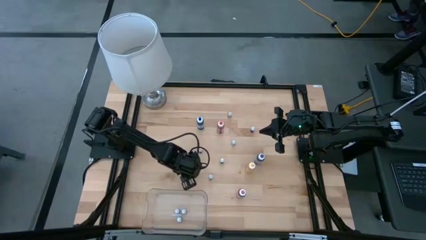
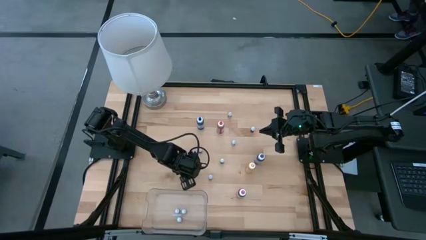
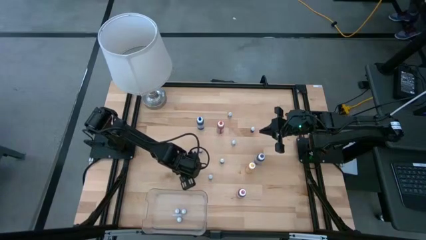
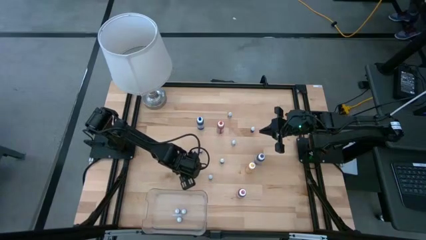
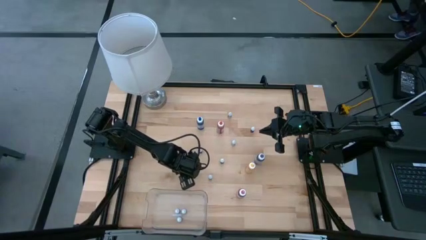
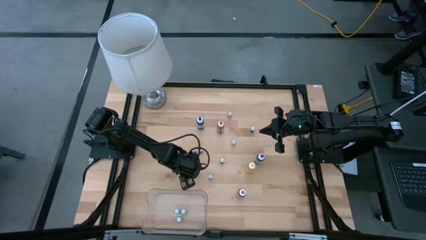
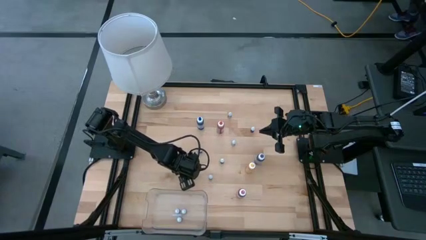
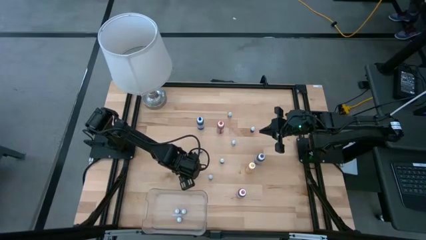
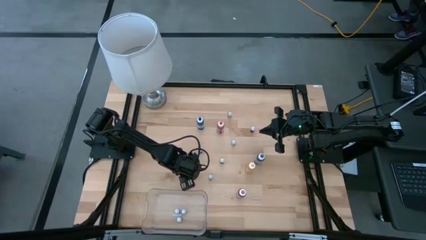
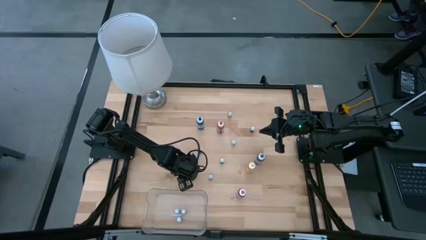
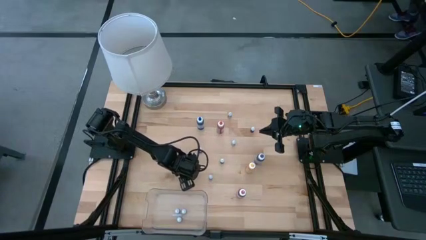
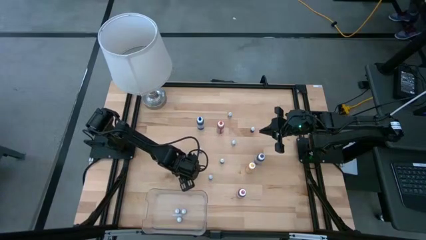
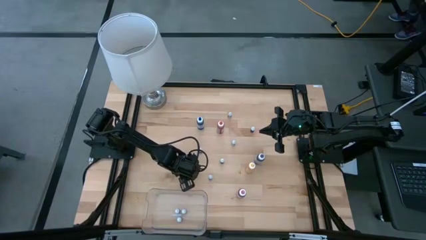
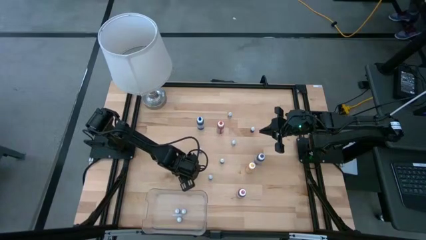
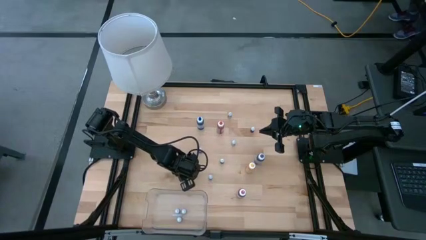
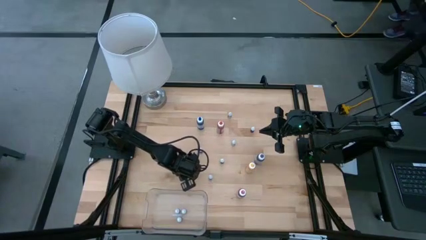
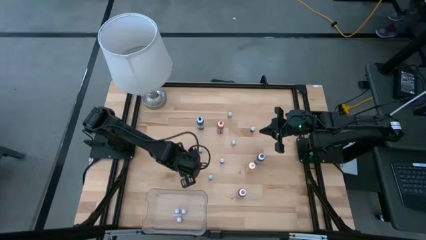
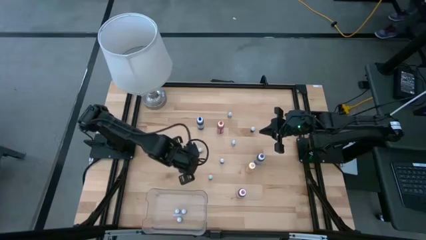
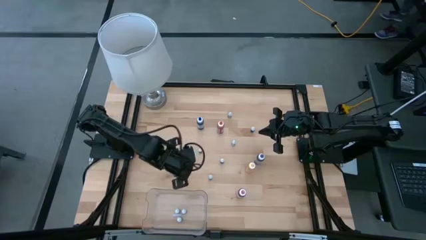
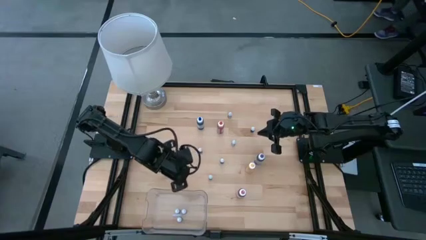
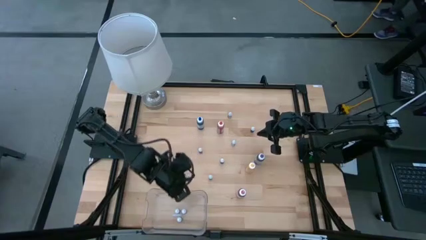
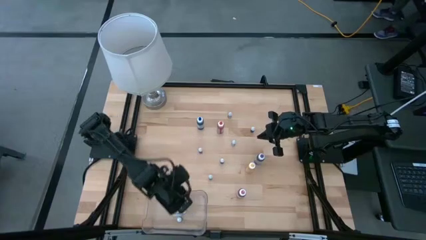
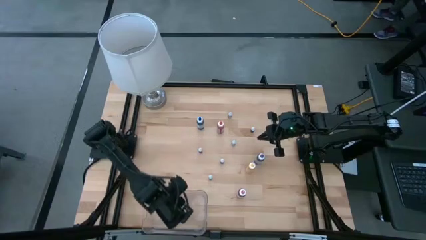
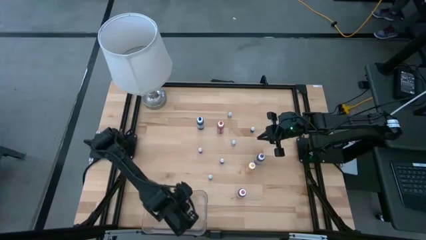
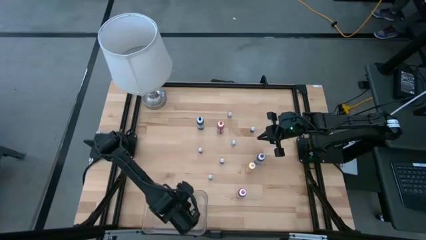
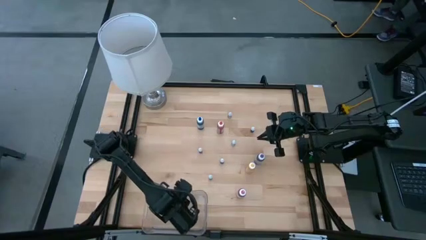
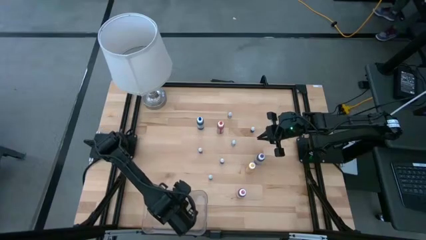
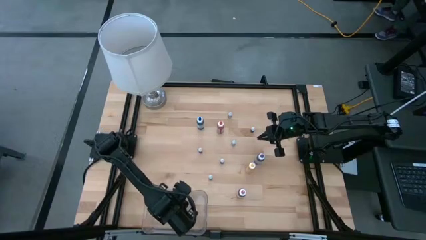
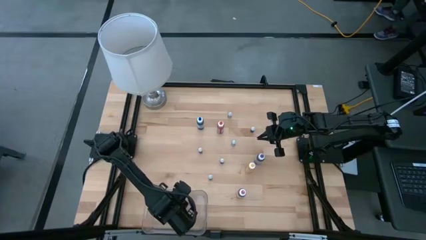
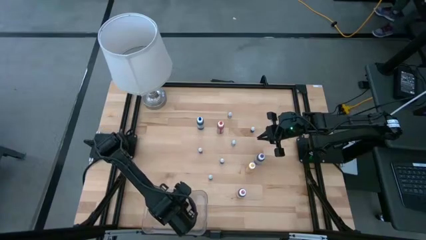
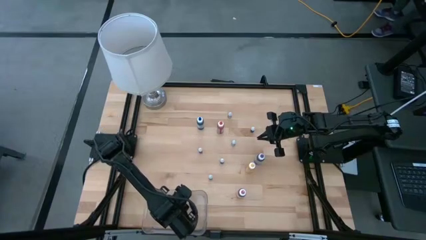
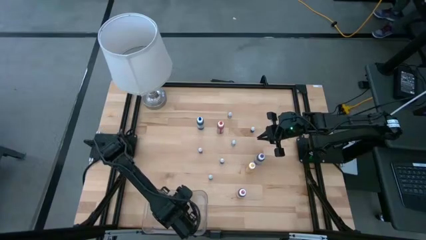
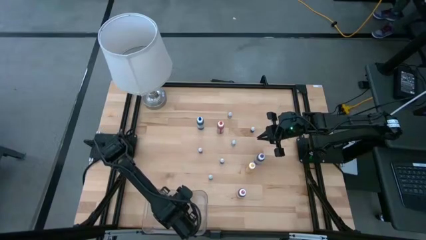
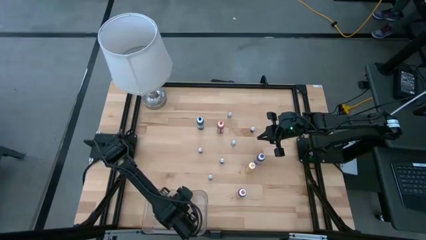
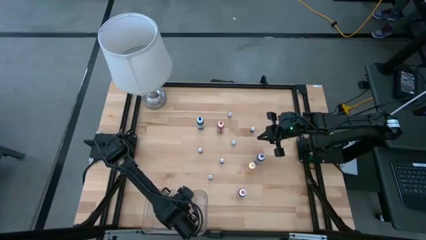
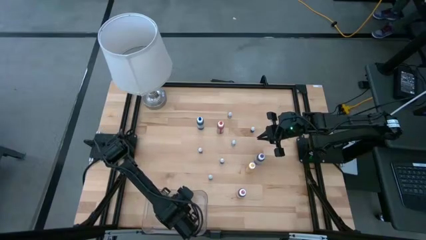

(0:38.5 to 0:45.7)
Task: Pick & Place food coloring
Put the bottom small blue food coloring bottle into the bin

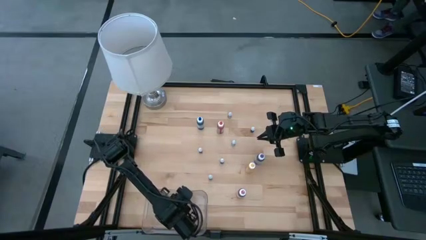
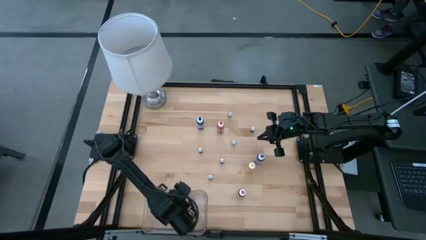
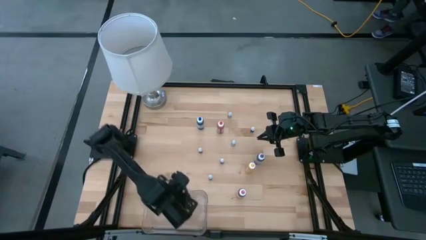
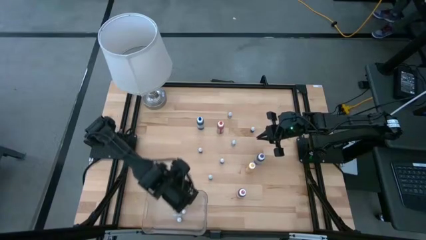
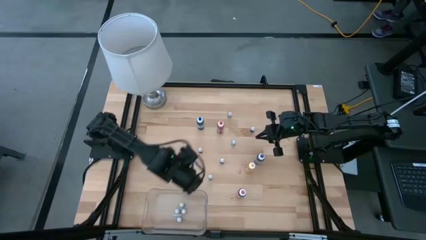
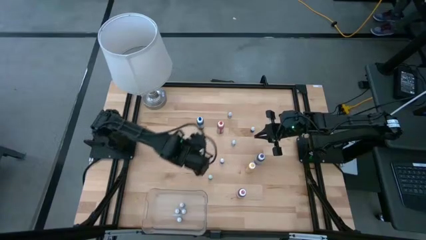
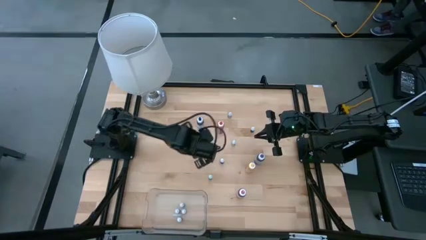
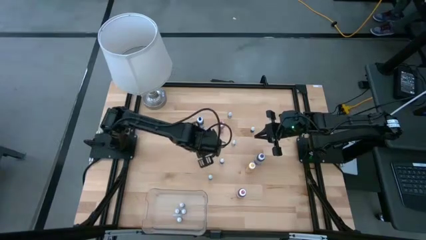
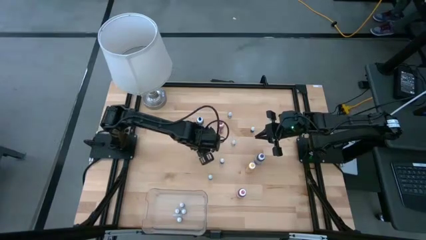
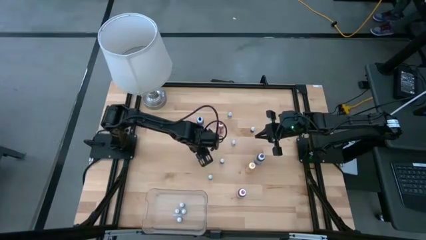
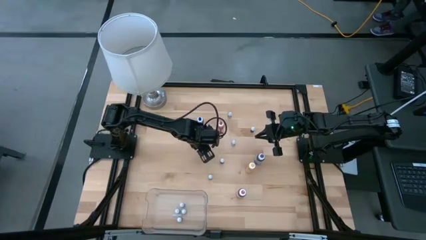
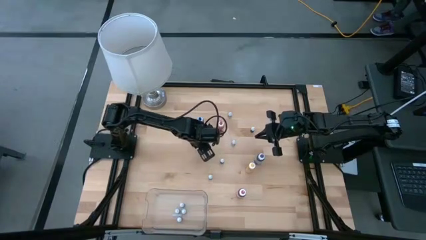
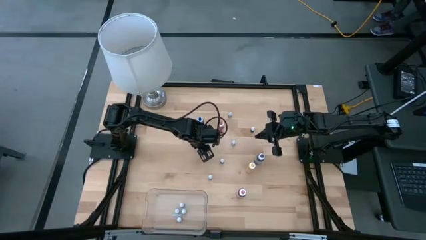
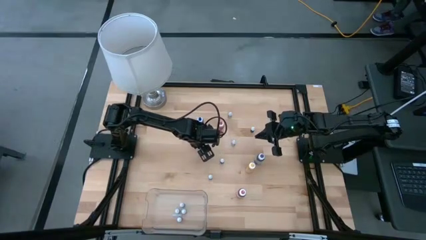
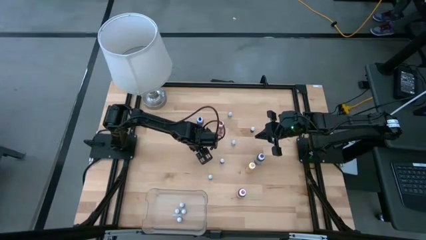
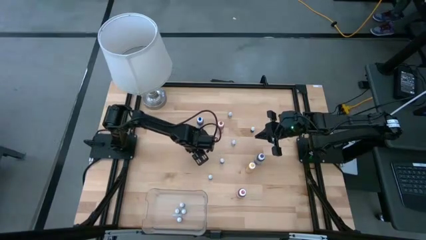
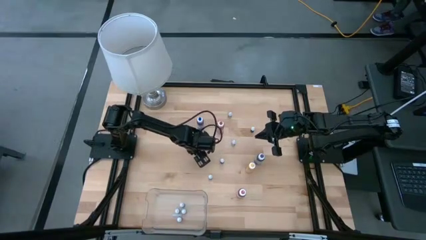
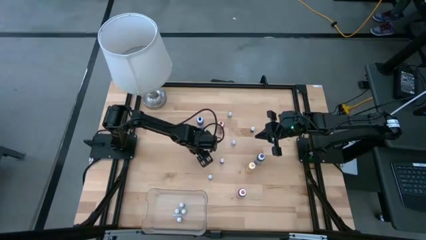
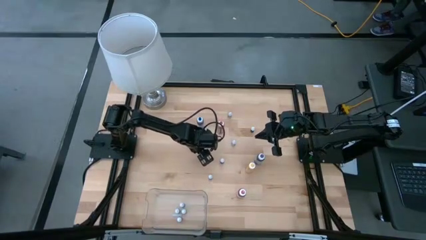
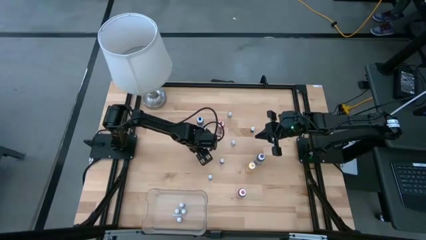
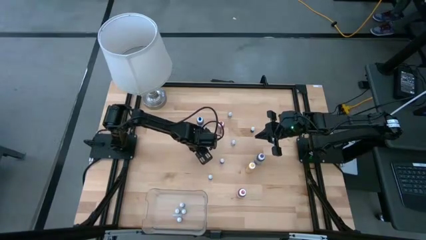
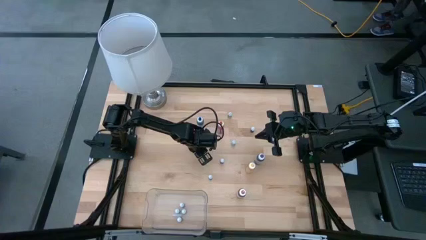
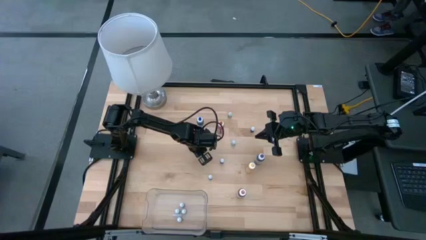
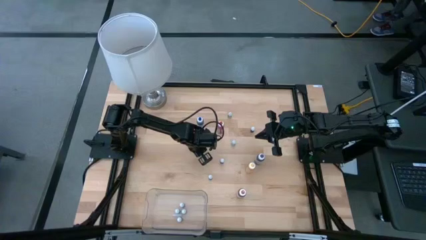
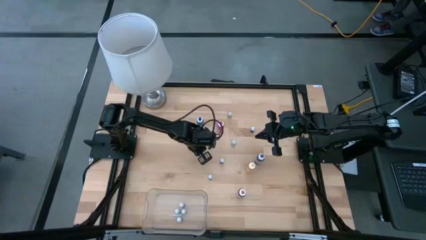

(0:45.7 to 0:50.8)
Put the small violet food coloring bottle into the bin

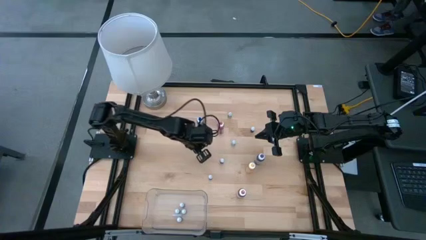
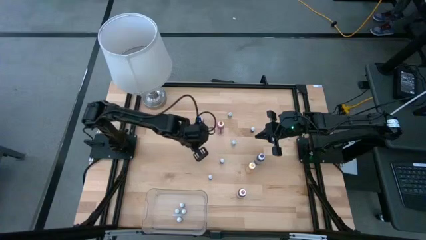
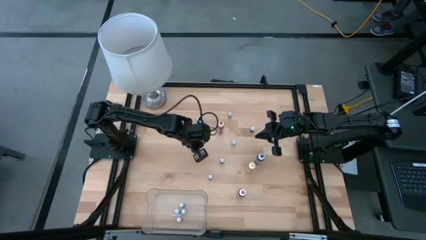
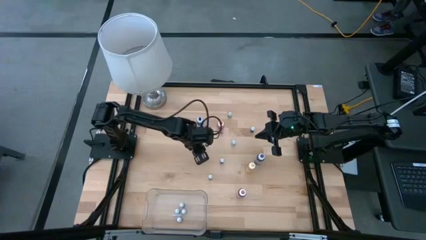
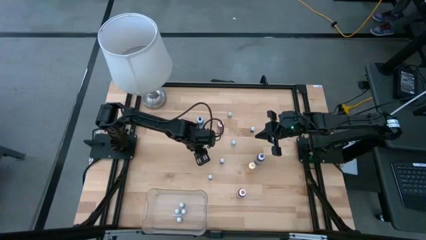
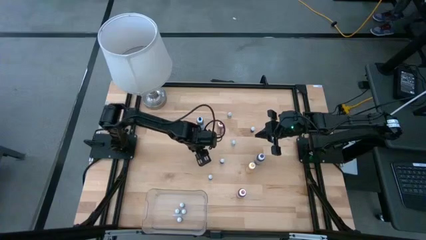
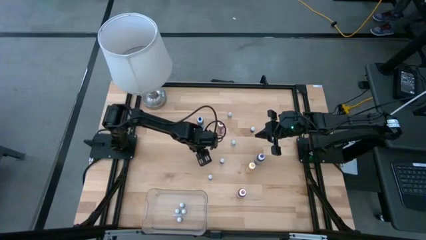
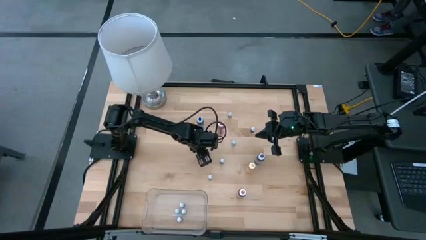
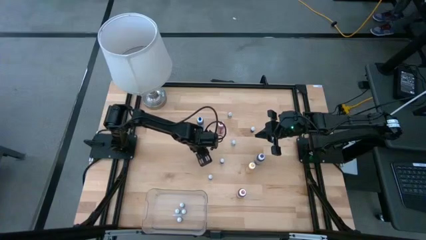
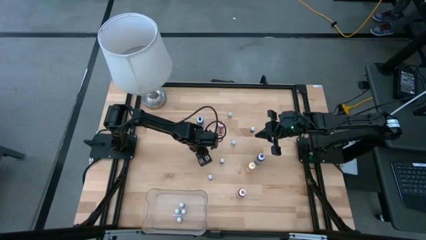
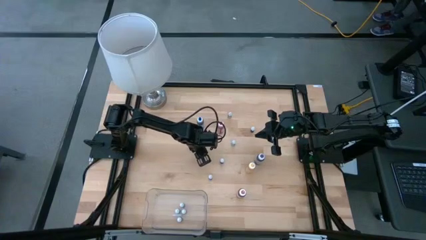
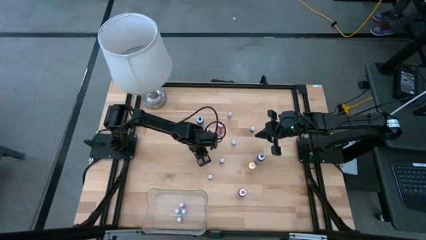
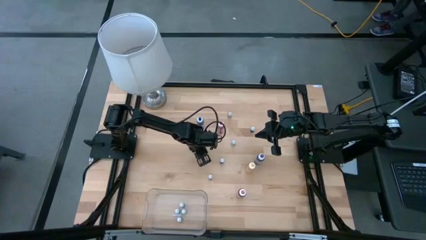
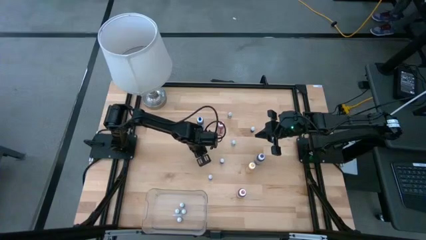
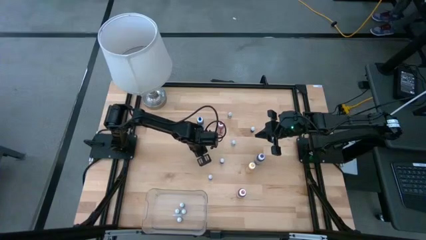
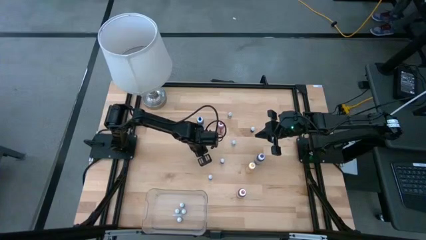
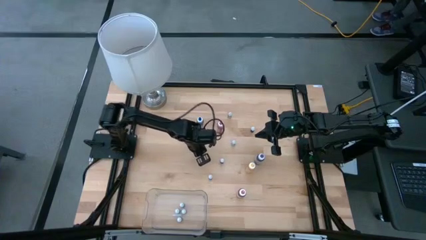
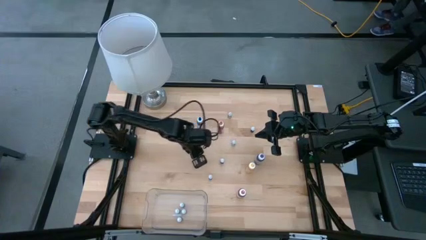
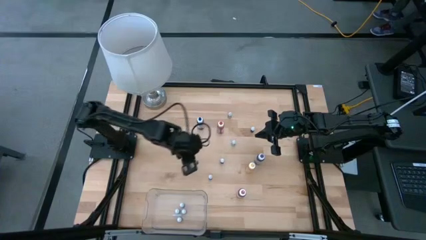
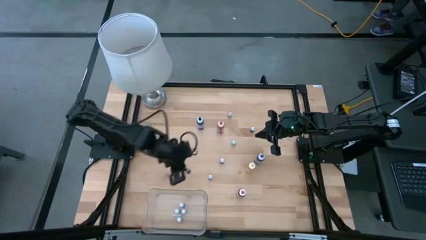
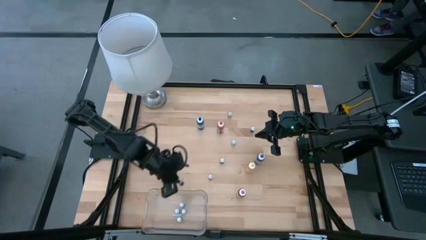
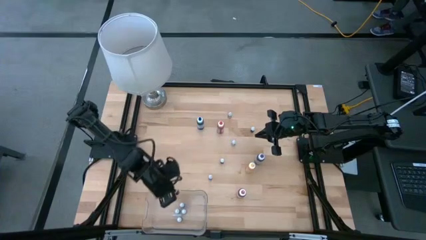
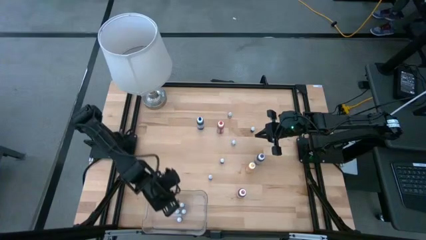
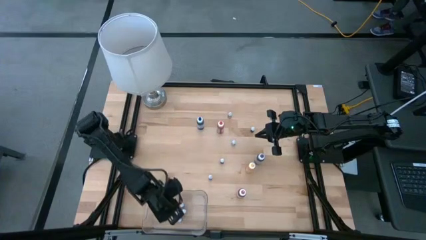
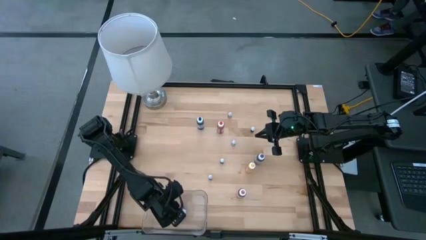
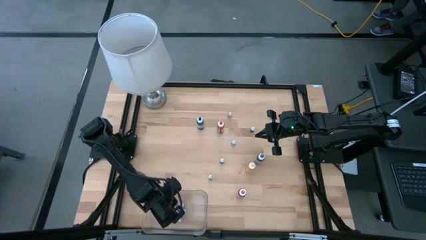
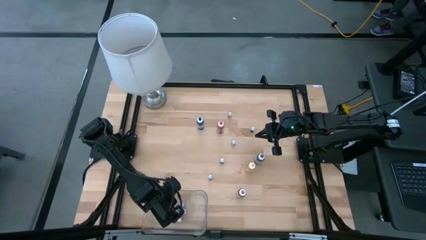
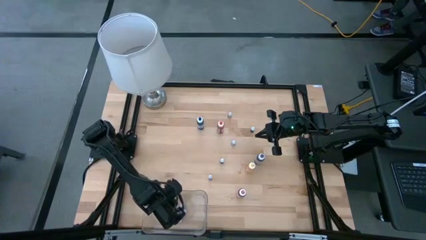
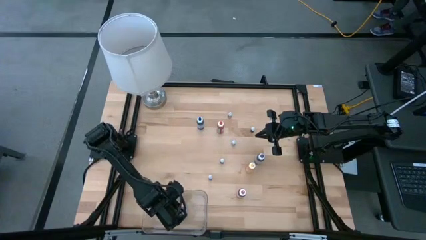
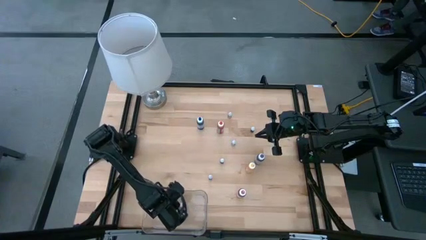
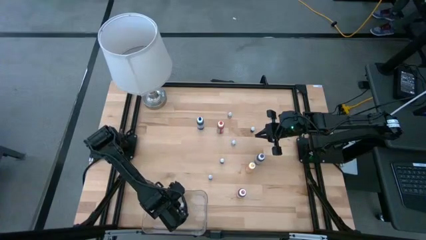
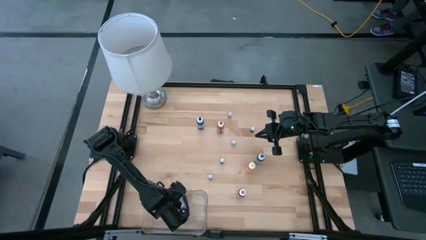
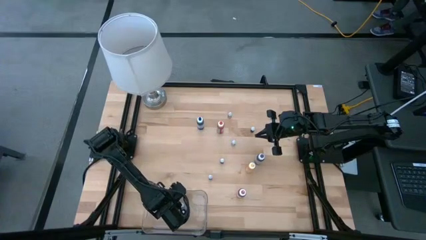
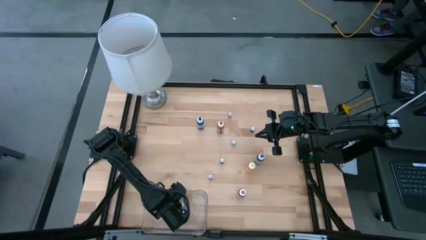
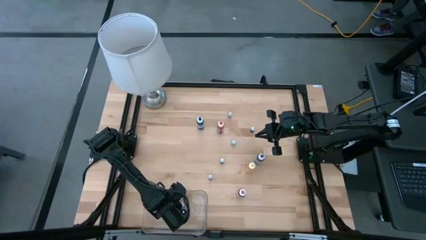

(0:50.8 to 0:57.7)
Put the small violet food coloring bottle into the bin
